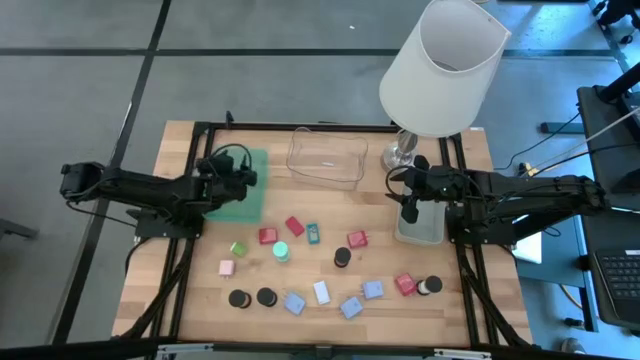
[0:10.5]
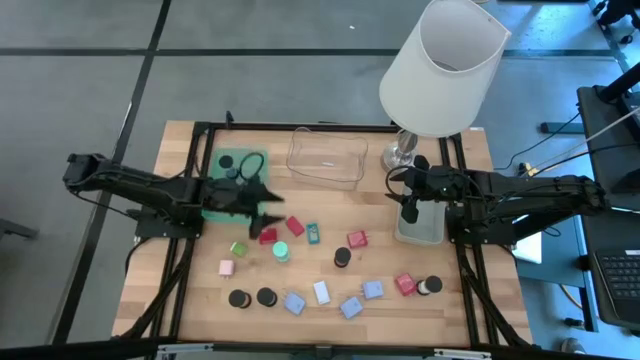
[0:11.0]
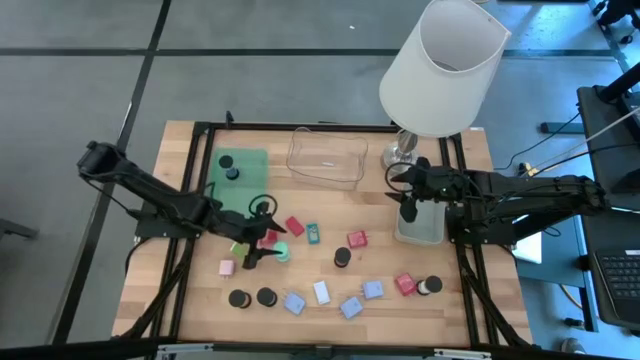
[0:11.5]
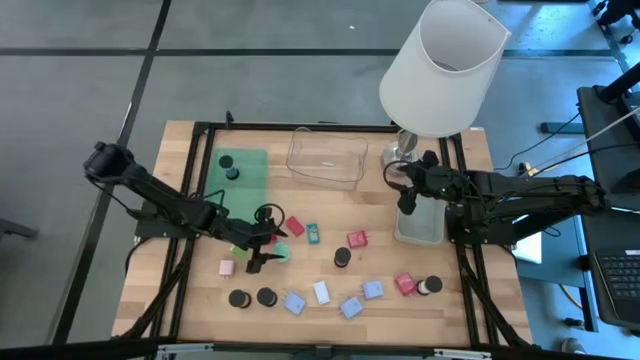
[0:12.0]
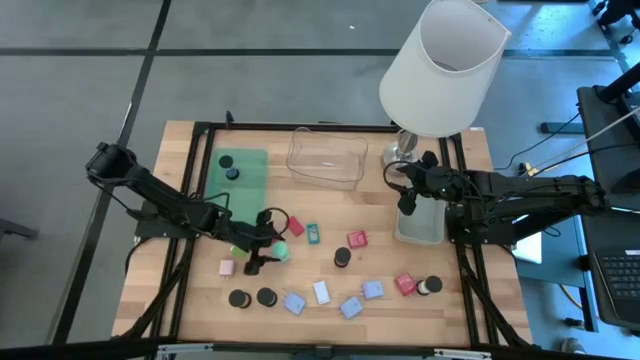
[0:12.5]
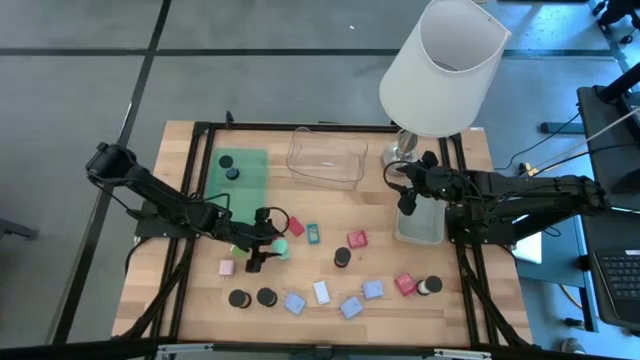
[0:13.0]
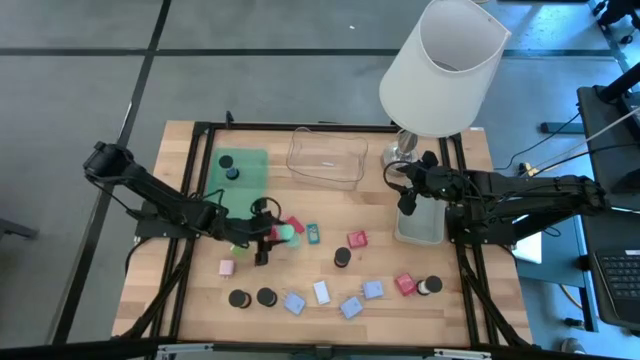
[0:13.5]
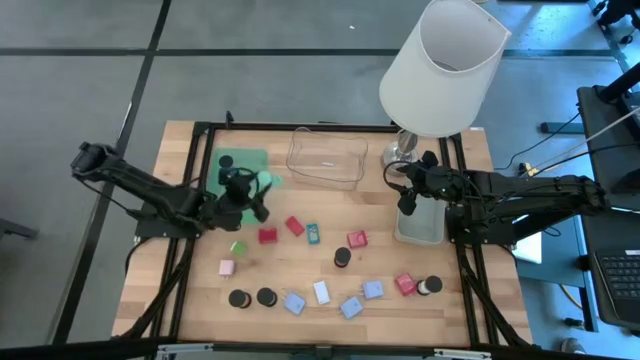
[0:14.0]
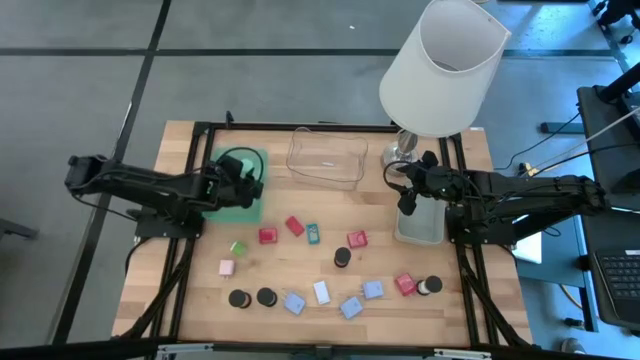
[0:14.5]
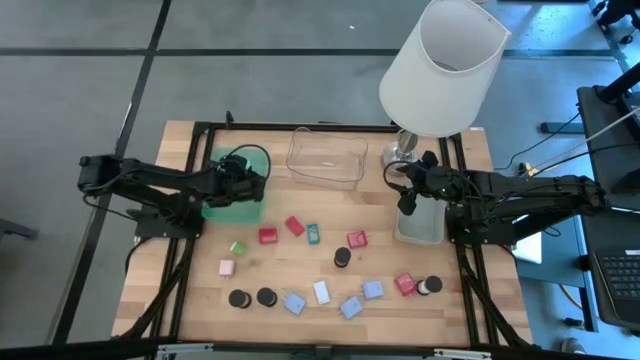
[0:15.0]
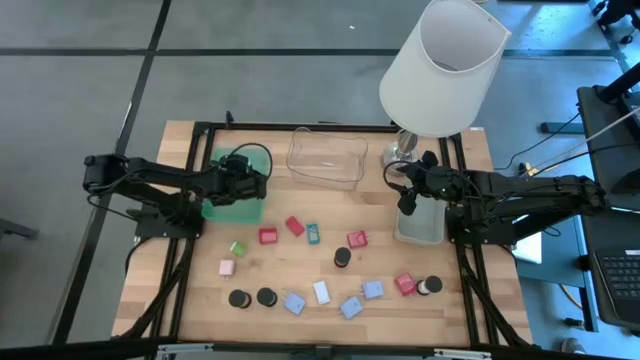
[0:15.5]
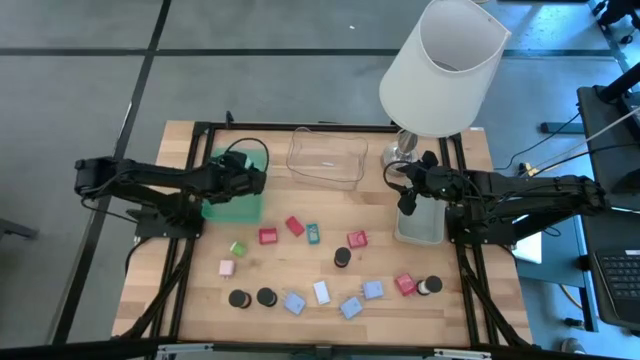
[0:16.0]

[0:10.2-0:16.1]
Task: Pick & Place Office items
Put the light blue hourglass into the green bin

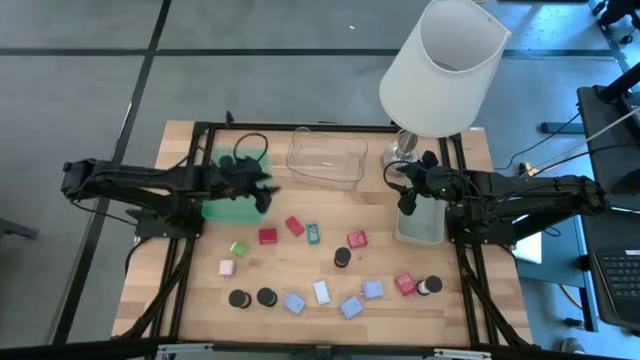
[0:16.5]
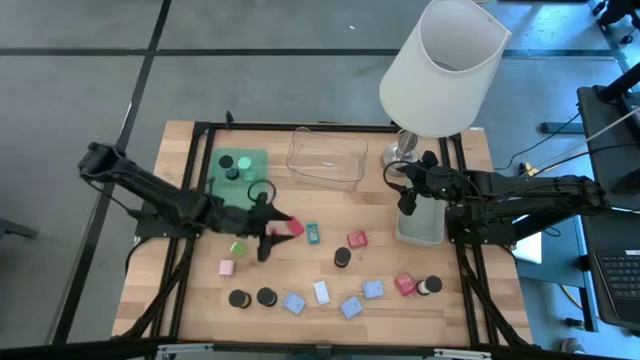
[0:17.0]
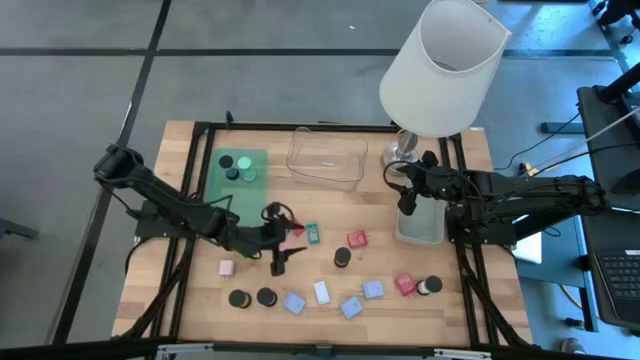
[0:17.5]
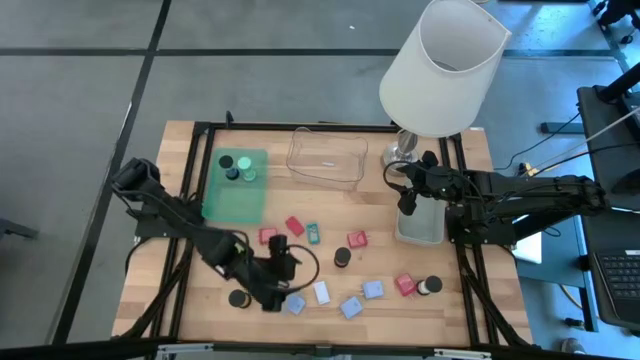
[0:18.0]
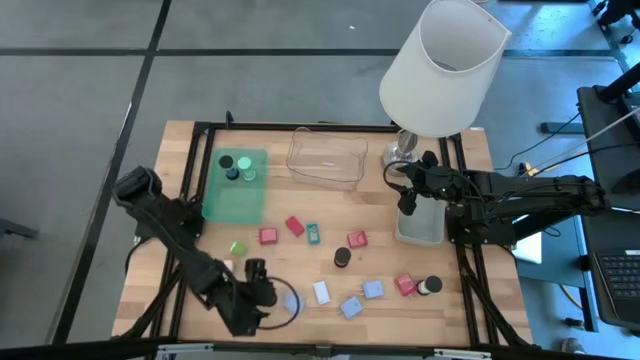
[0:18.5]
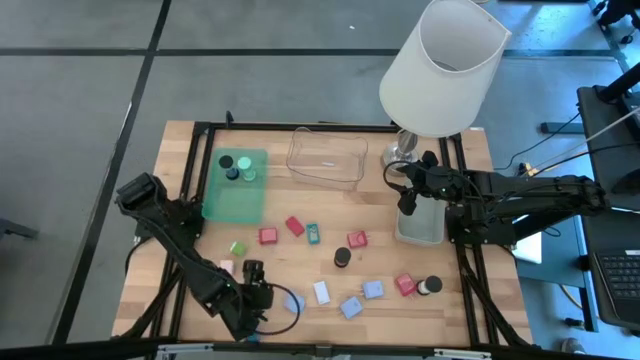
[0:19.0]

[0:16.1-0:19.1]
Put the black and blue hourglass into the green bin

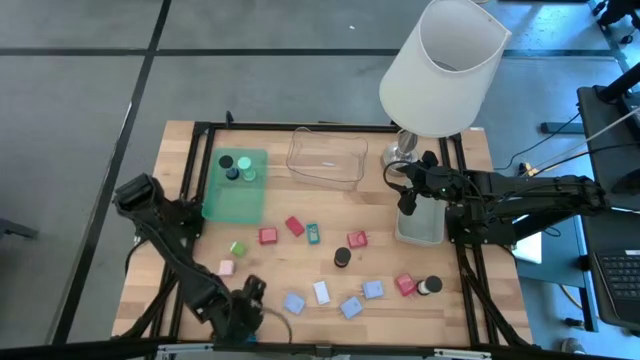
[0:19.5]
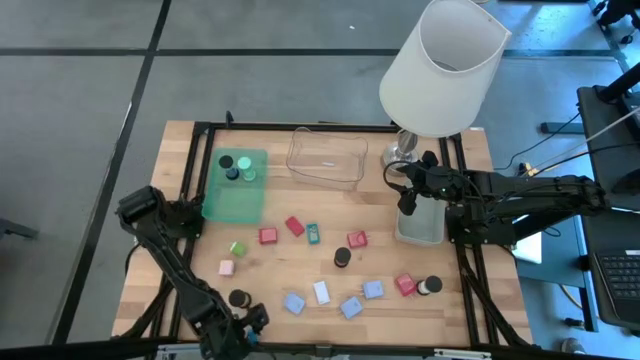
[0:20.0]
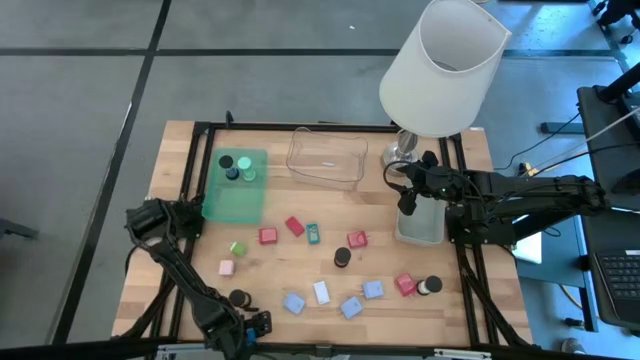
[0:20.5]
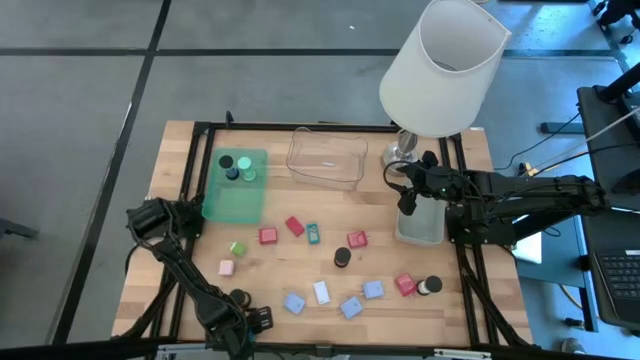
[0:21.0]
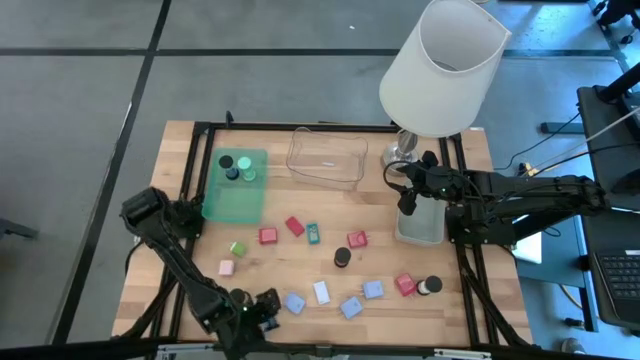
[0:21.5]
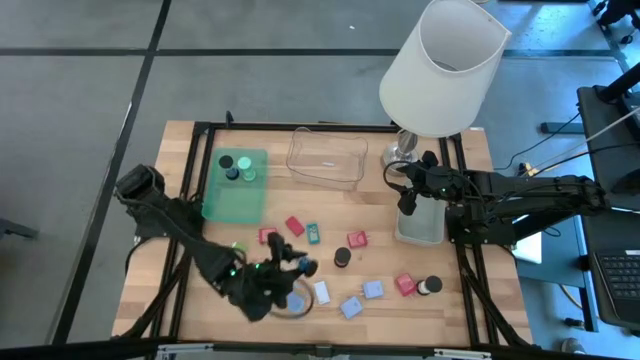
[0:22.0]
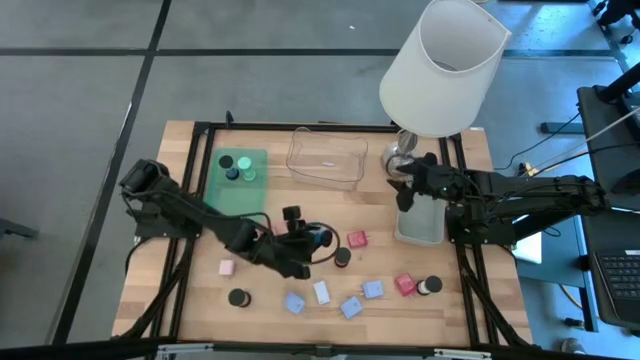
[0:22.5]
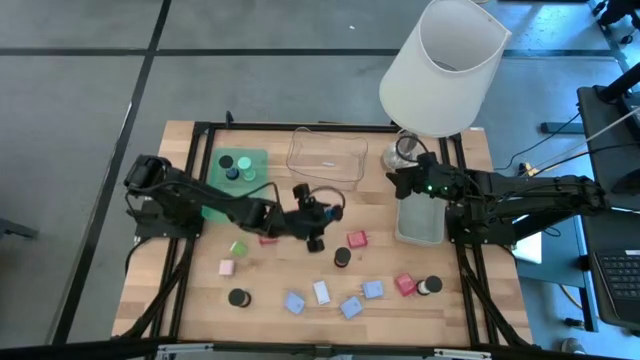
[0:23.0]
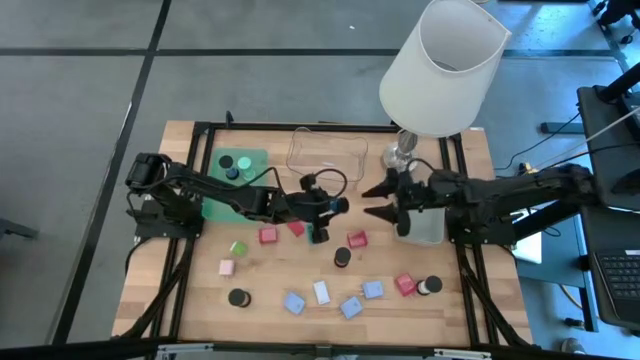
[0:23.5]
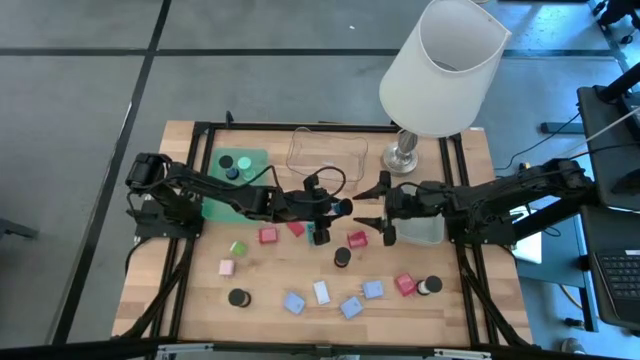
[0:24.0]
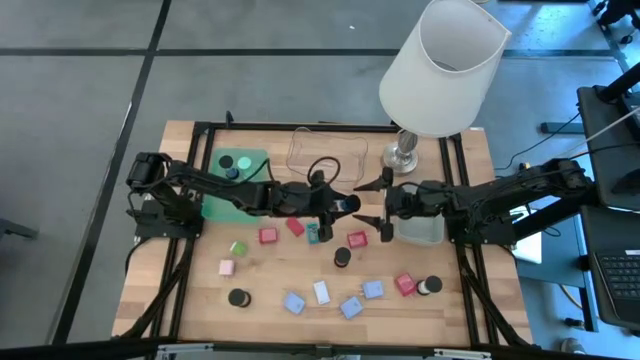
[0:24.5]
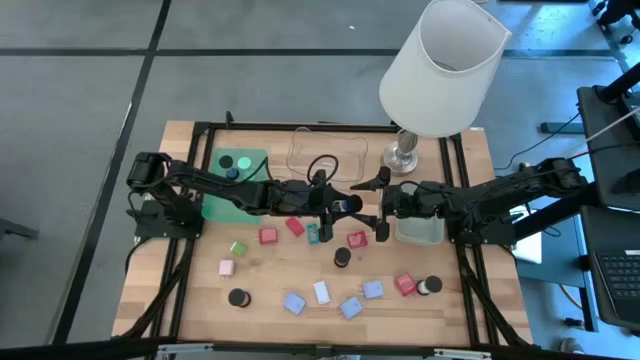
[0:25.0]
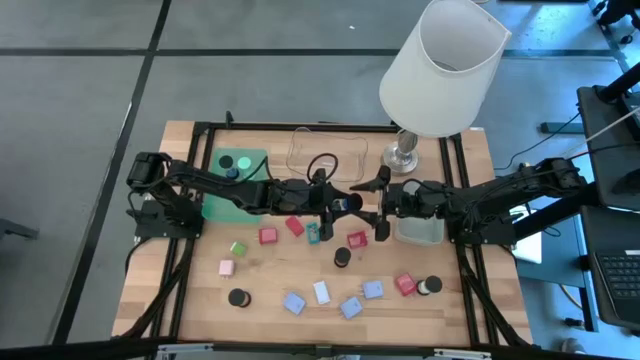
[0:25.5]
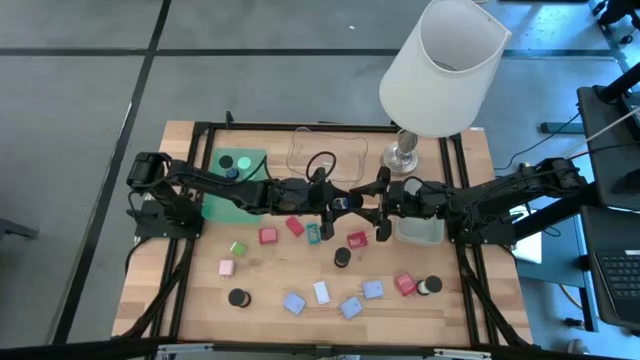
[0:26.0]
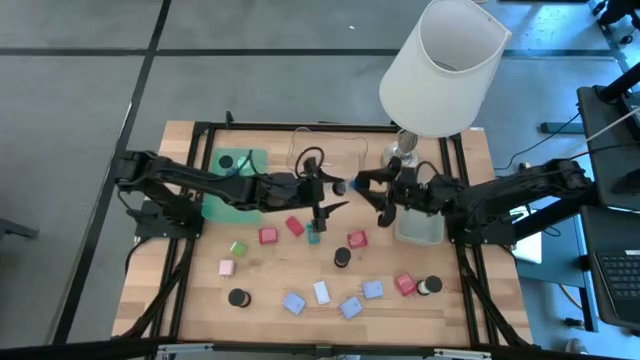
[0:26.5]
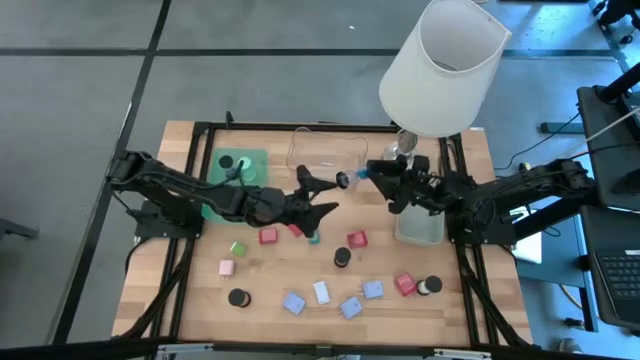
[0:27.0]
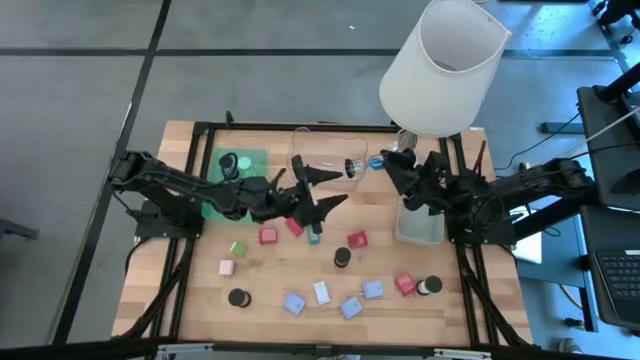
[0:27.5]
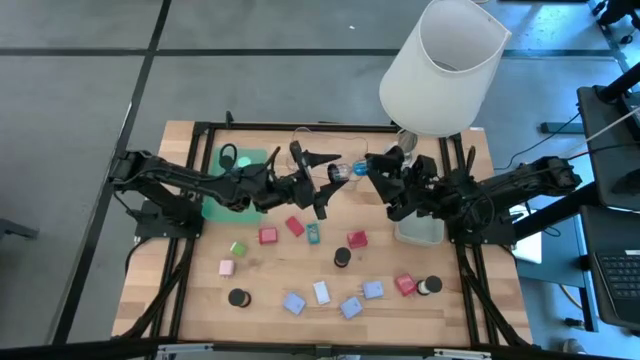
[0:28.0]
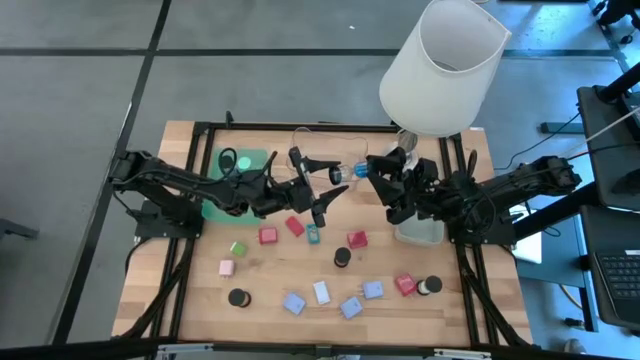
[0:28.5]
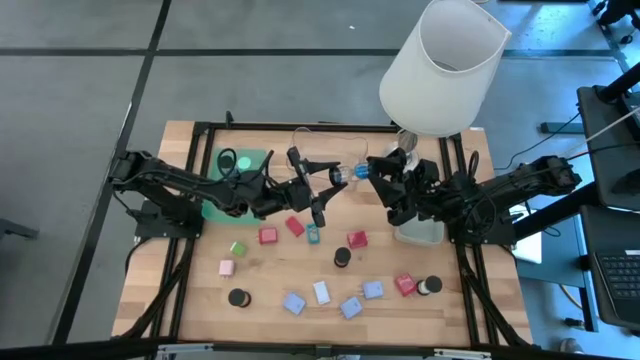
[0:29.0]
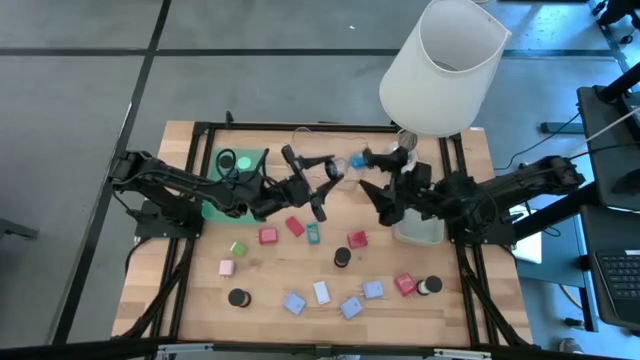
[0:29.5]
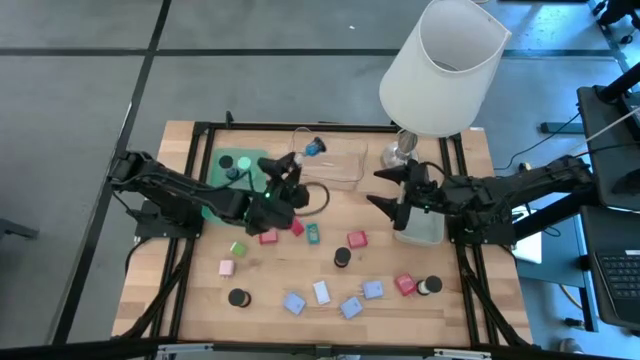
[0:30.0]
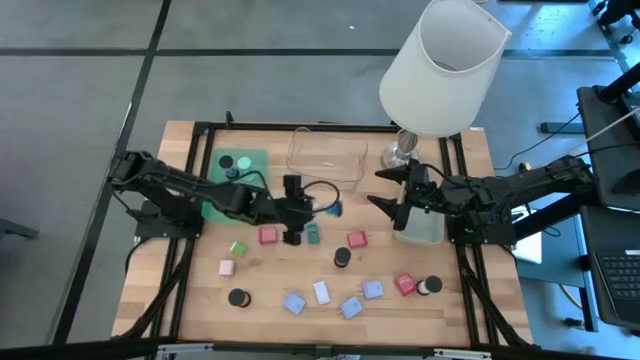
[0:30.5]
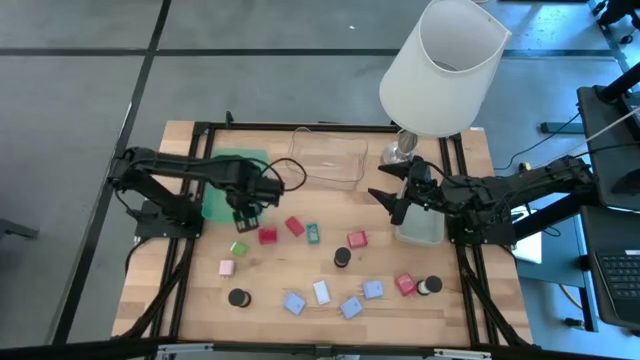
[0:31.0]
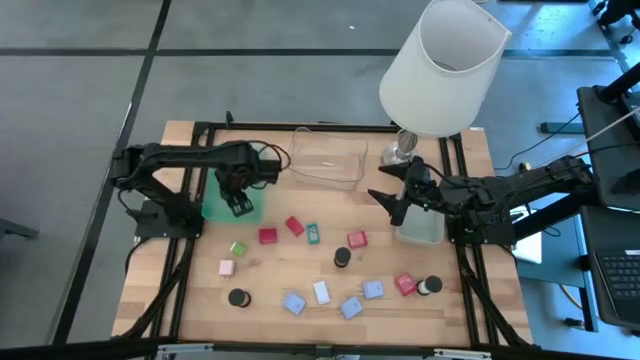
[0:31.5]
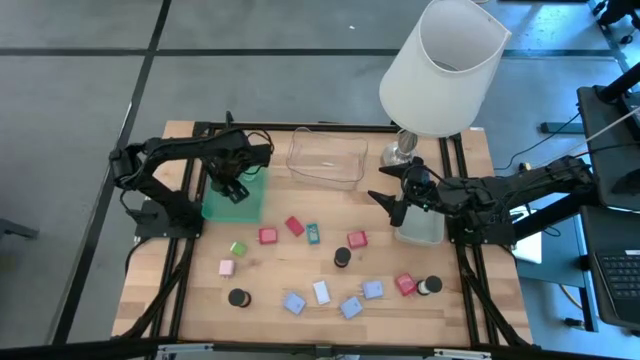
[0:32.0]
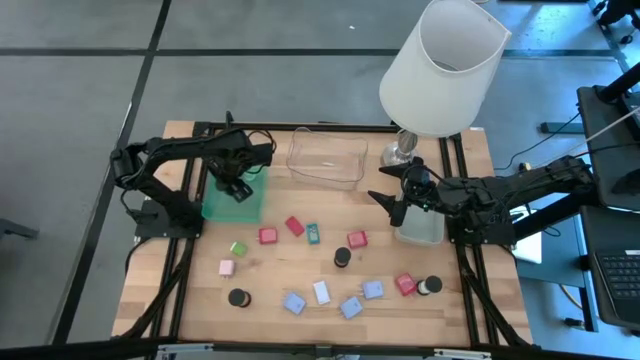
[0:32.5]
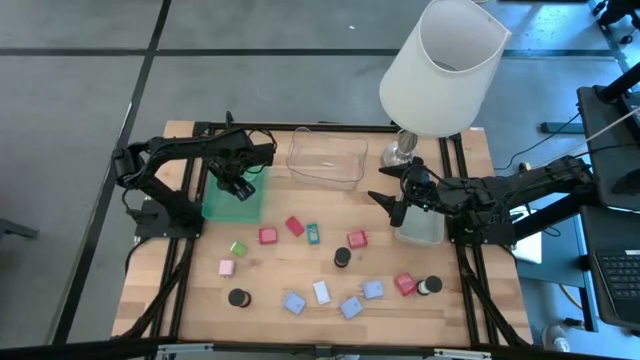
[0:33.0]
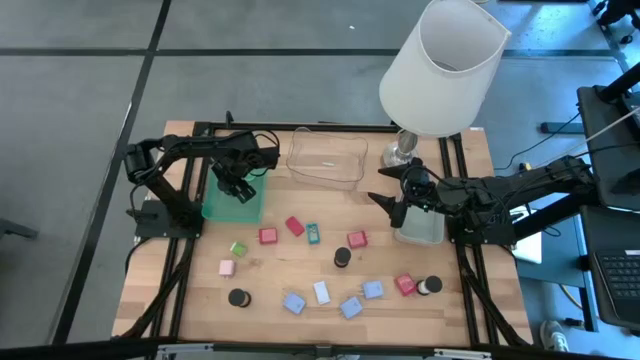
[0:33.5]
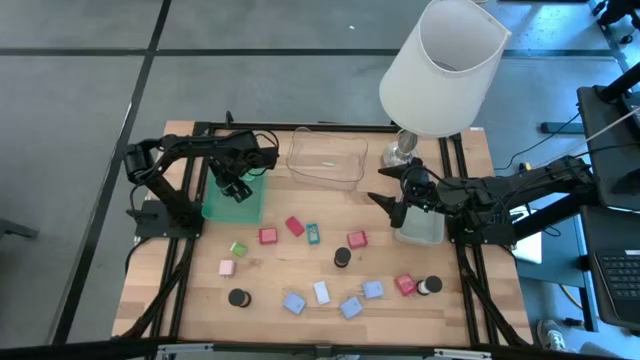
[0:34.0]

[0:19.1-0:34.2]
Put the blue hourglass into the green bin
